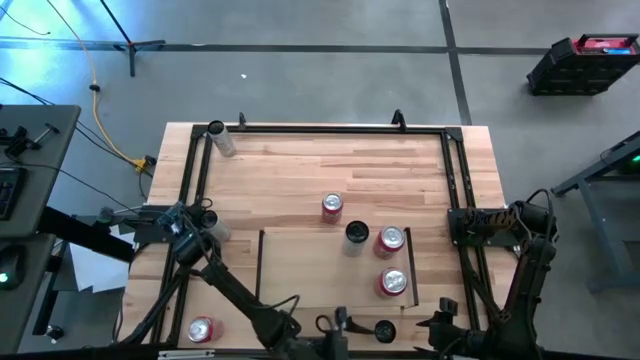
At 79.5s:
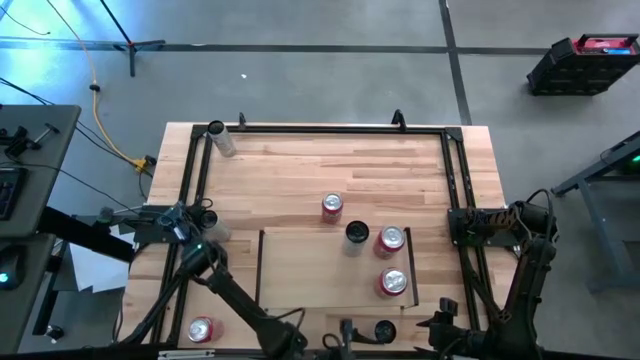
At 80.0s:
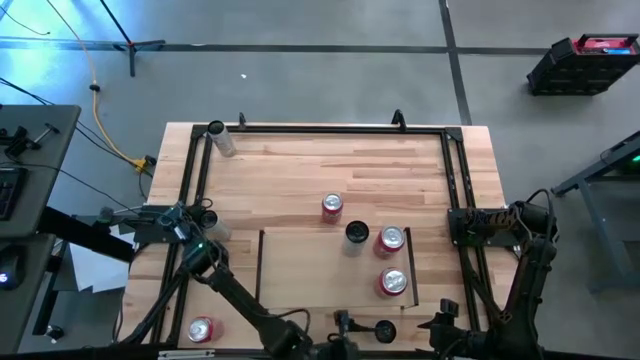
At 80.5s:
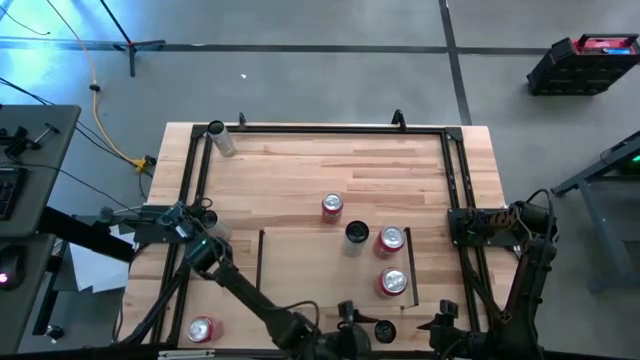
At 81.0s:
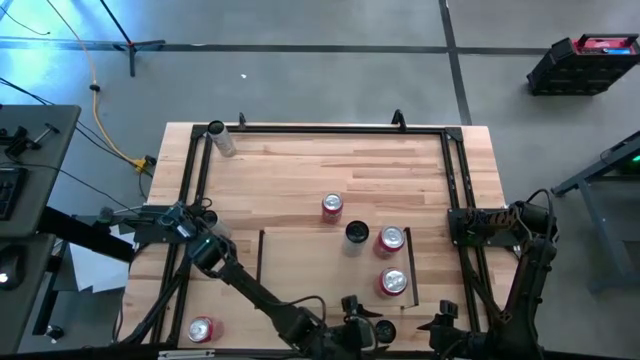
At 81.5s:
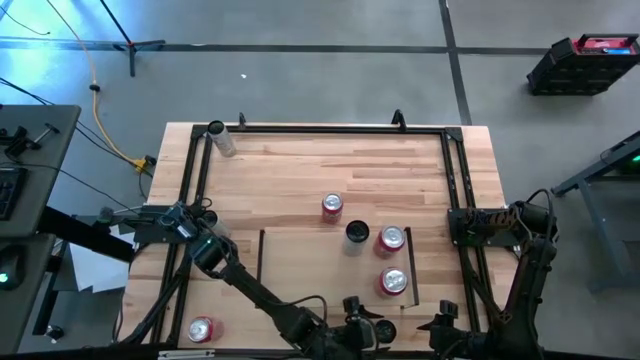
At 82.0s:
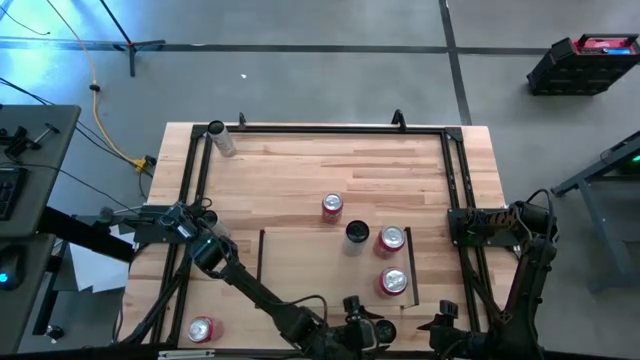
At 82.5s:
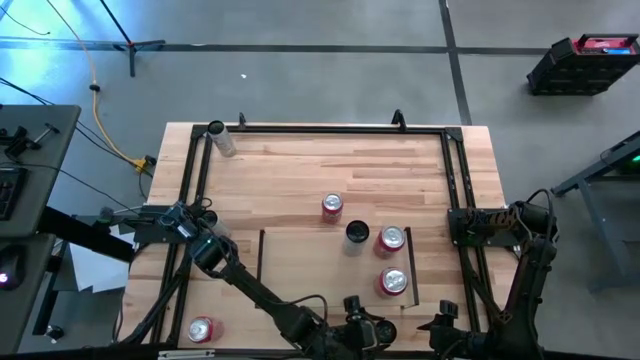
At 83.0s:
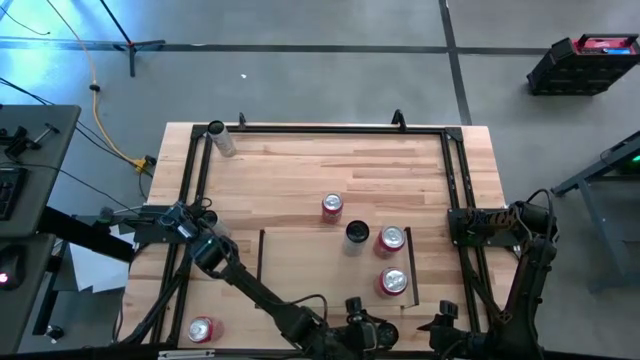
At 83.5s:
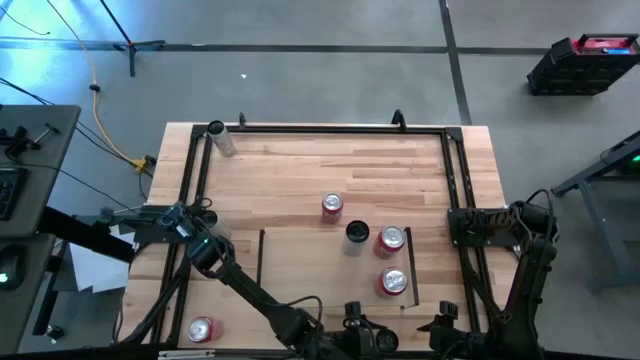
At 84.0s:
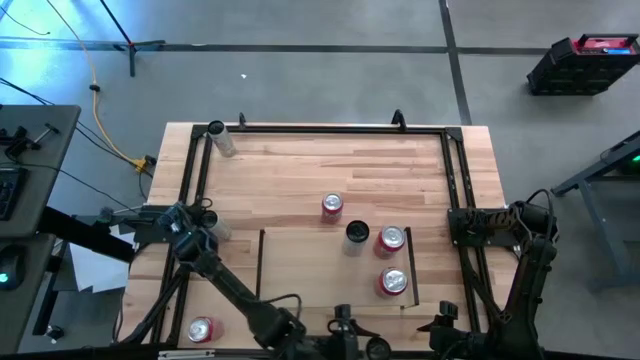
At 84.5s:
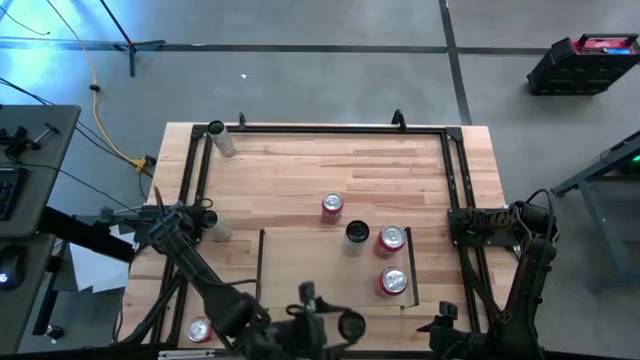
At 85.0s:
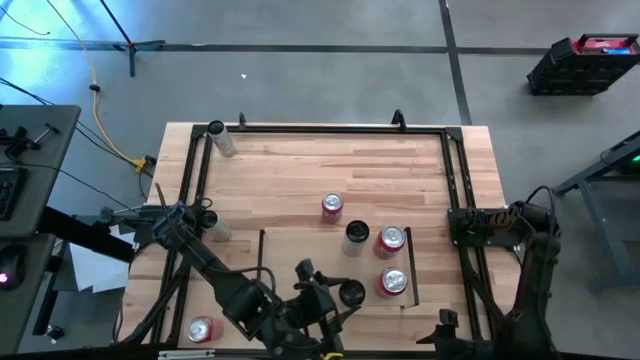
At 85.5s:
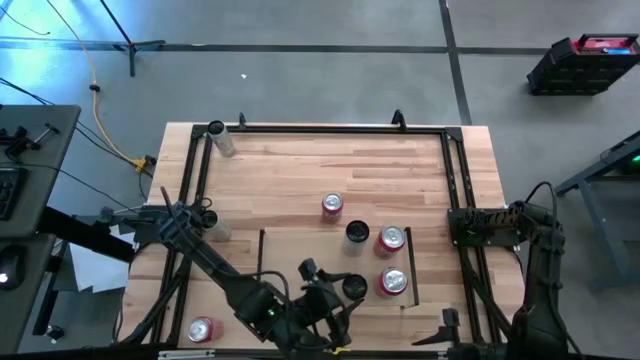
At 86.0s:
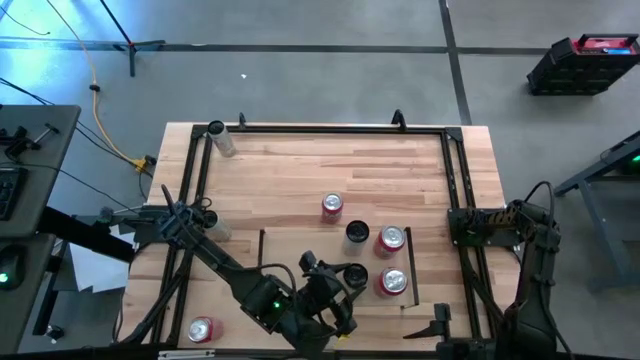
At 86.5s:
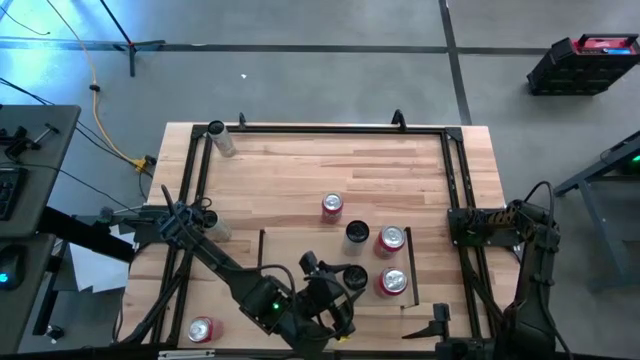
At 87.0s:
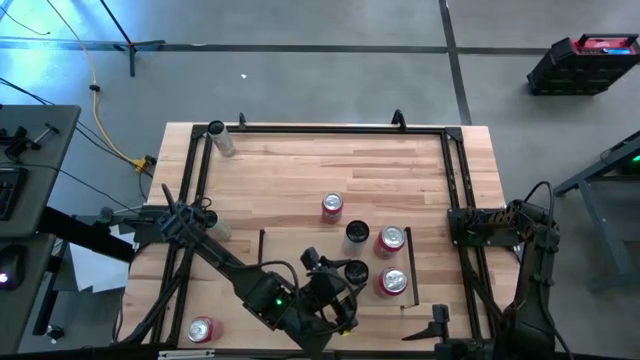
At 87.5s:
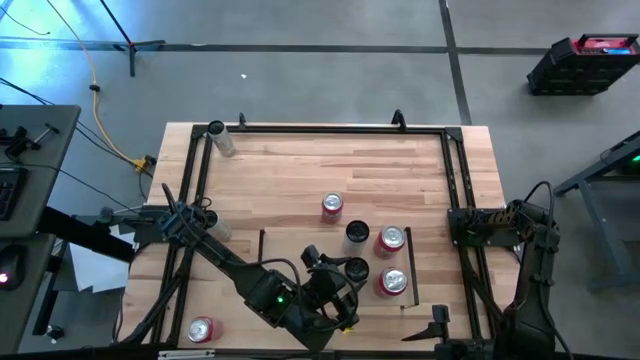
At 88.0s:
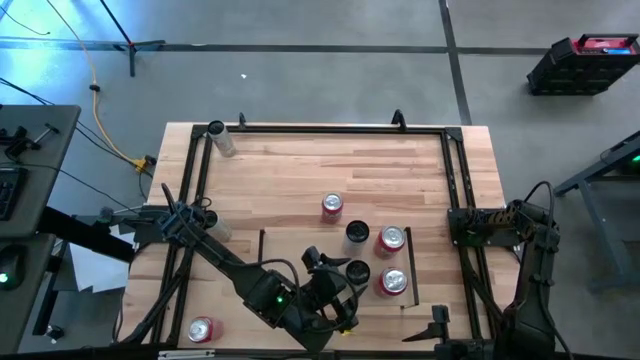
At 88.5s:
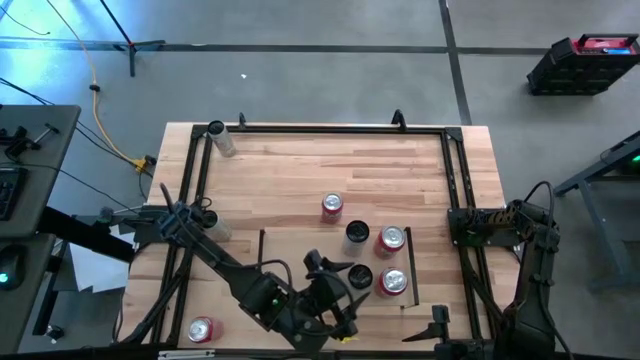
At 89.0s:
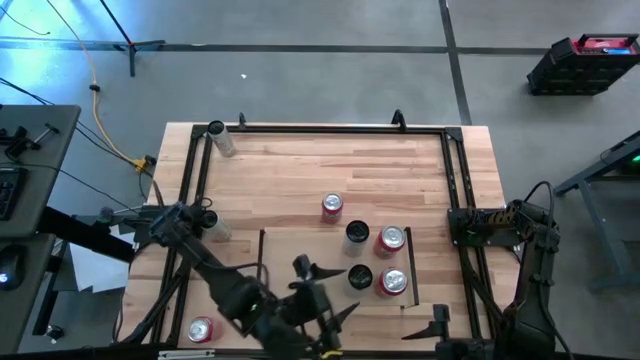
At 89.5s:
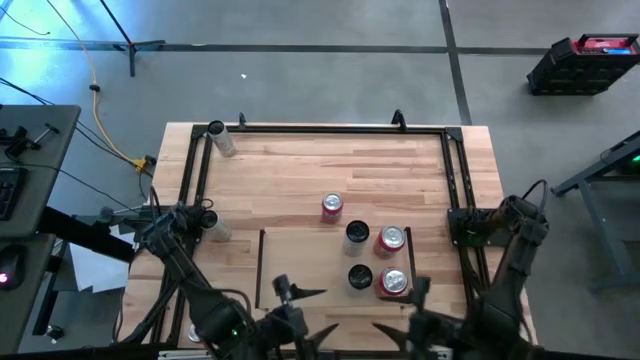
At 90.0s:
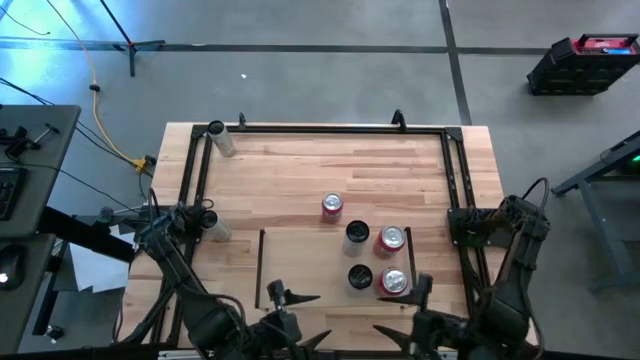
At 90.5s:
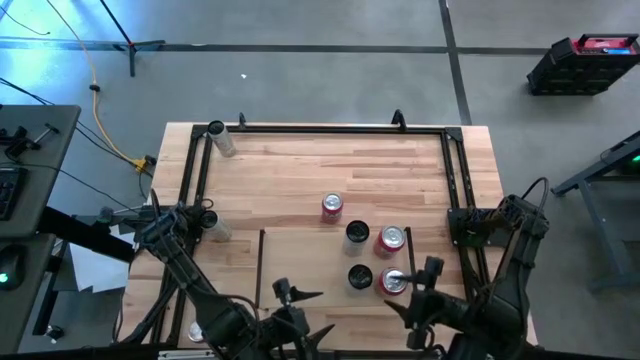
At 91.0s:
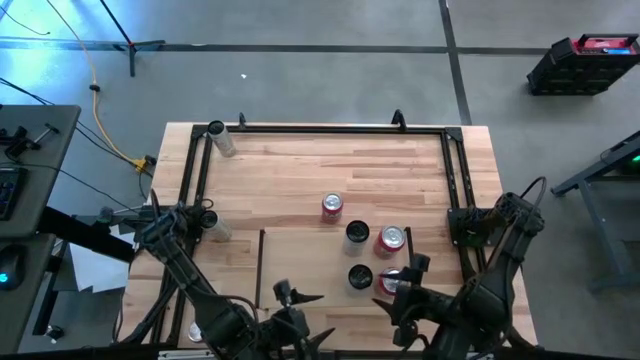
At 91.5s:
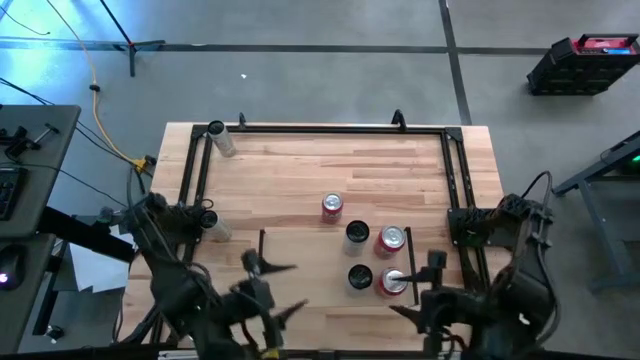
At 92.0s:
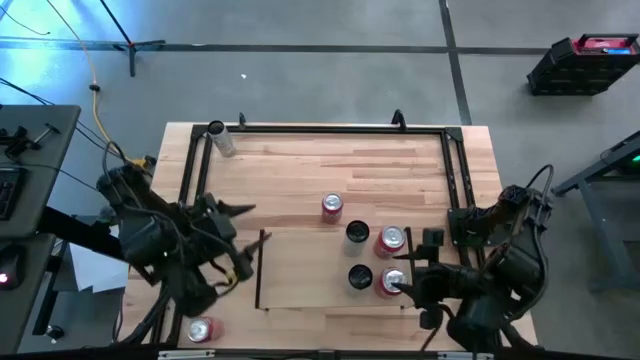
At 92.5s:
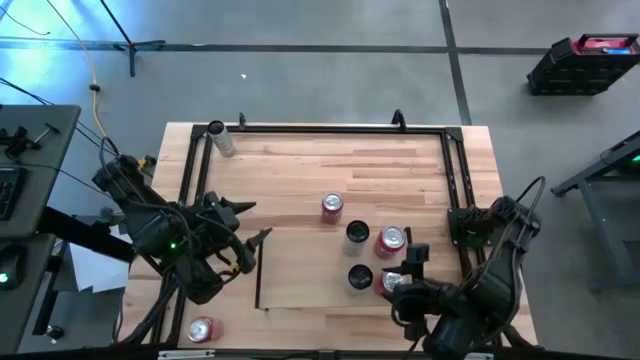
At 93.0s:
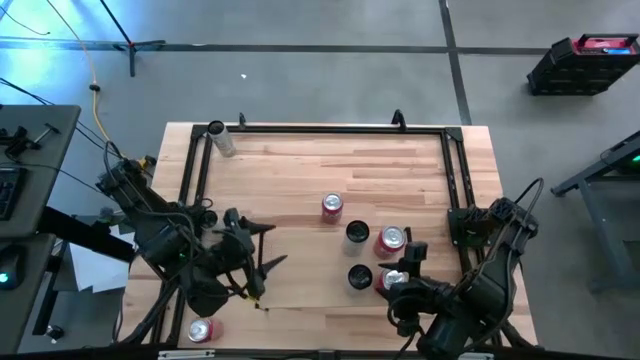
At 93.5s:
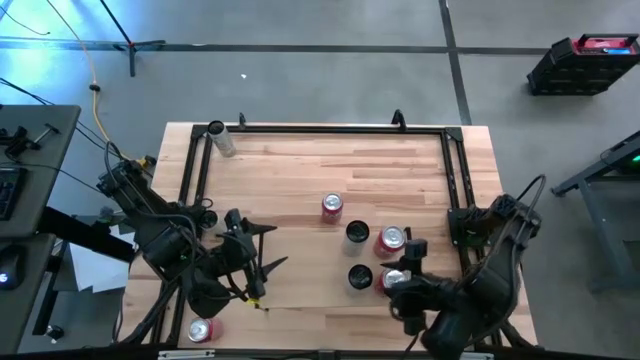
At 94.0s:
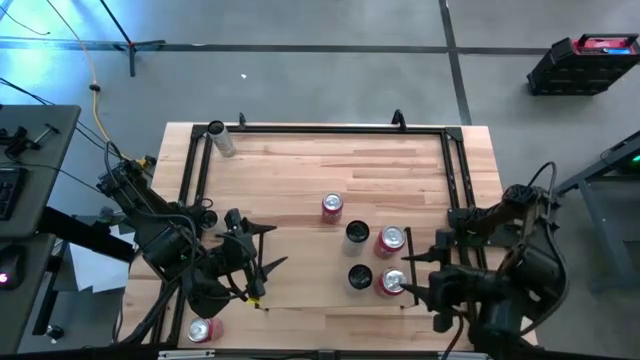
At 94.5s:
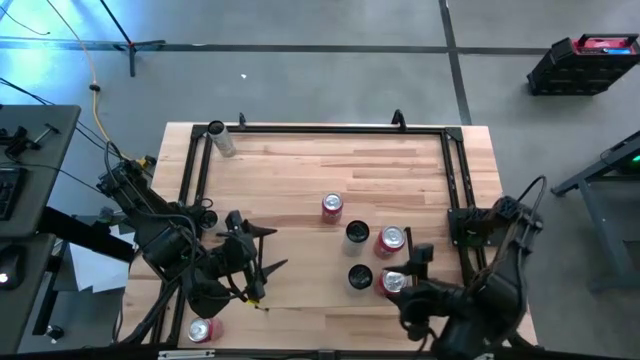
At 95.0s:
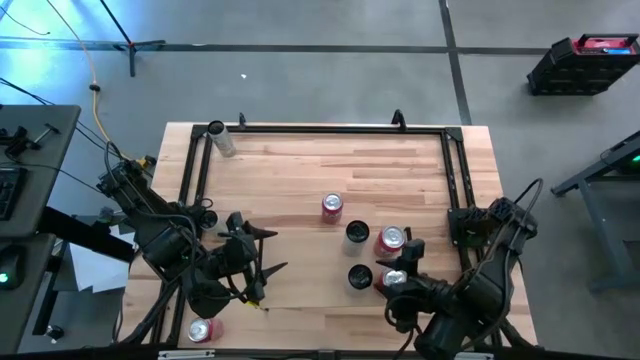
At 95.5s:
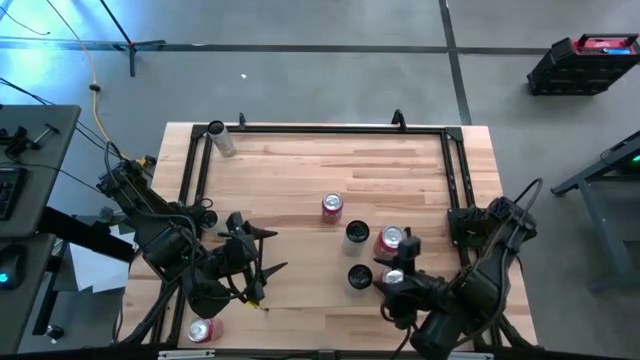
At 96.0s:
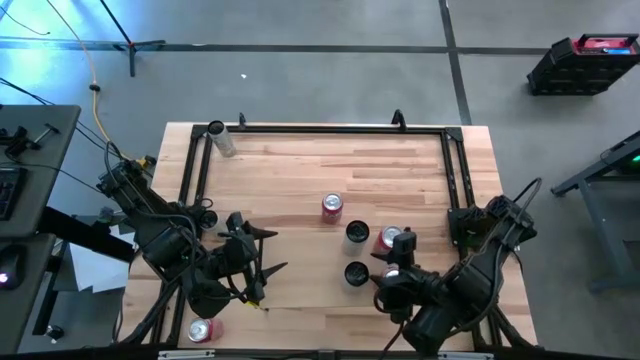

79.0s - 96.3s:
Task: Place canned beverage on shelf
Put the bottom white yellow soda can on the shelf aligned with the white yellow soda can
